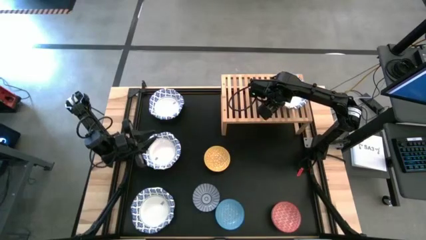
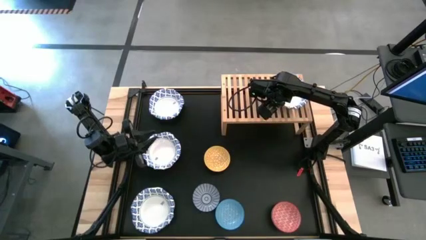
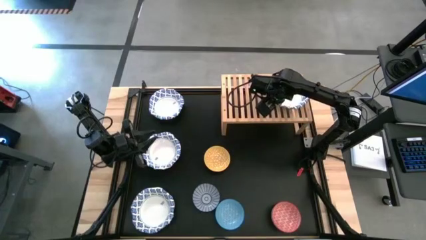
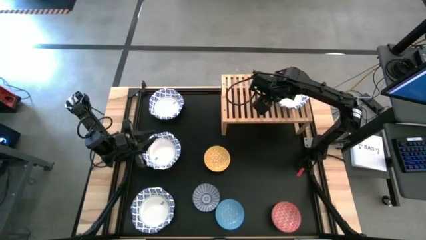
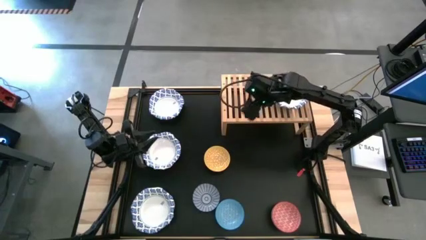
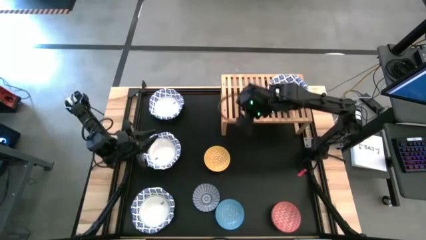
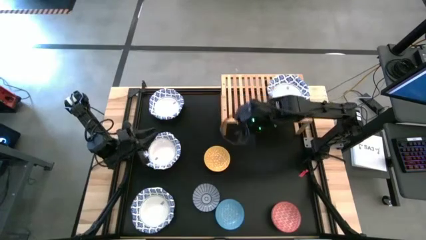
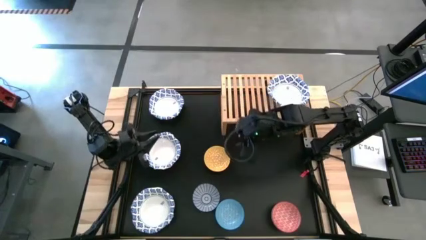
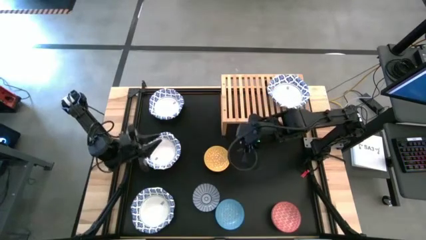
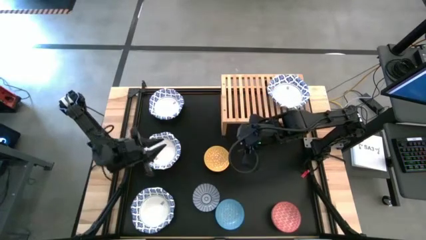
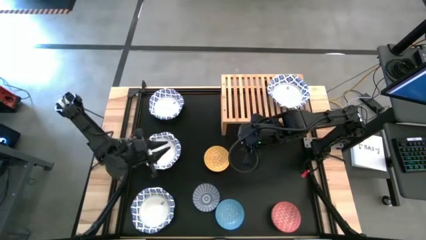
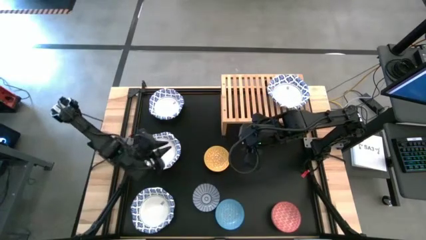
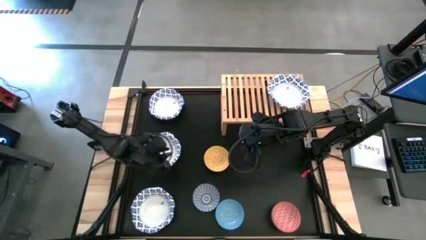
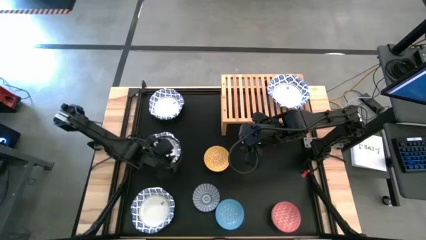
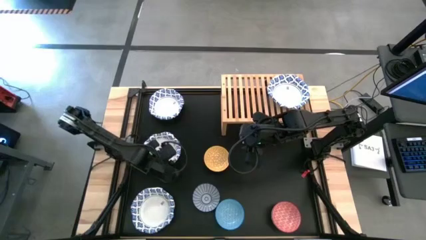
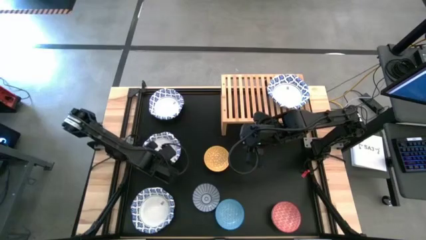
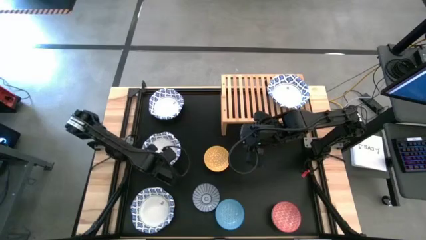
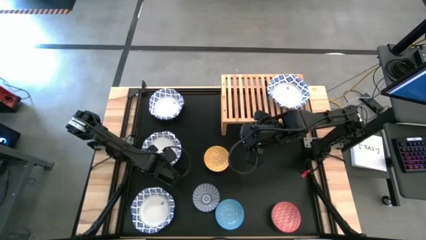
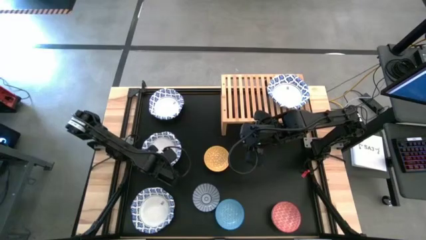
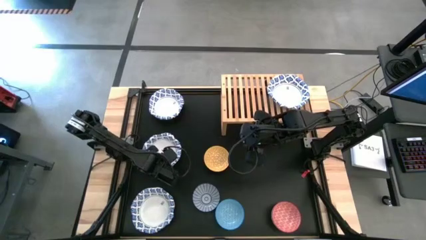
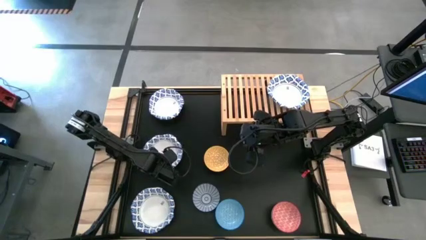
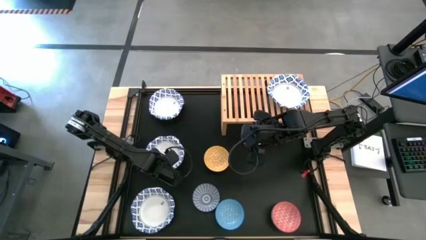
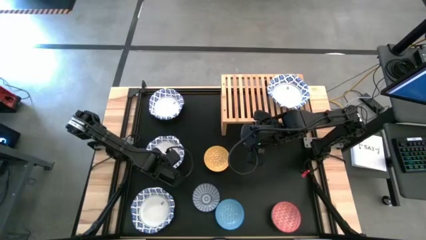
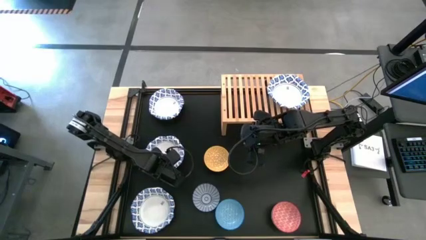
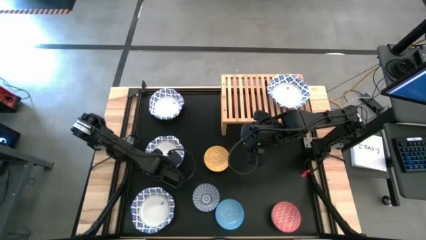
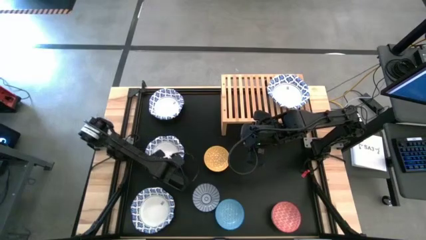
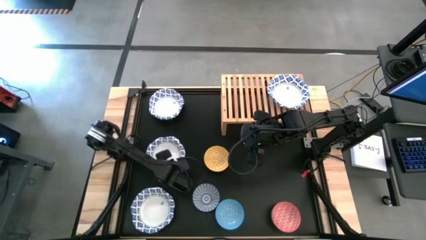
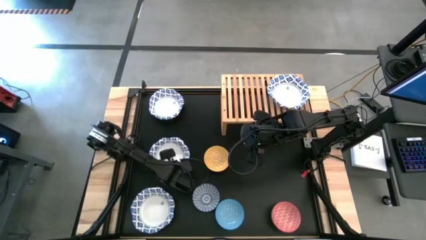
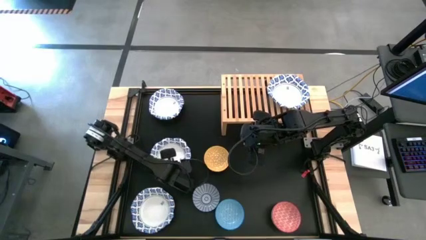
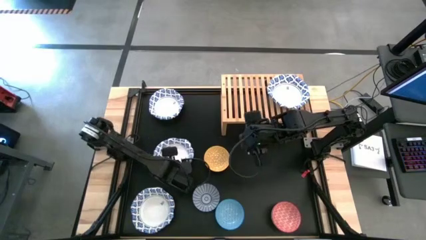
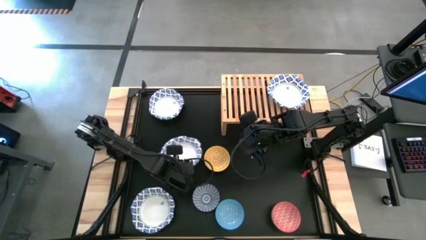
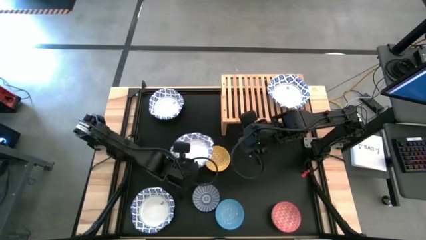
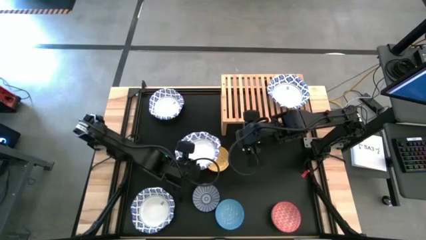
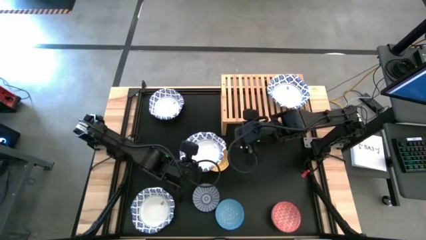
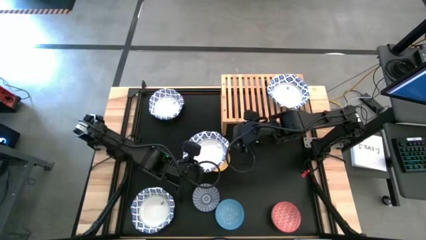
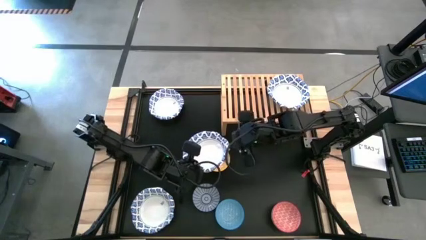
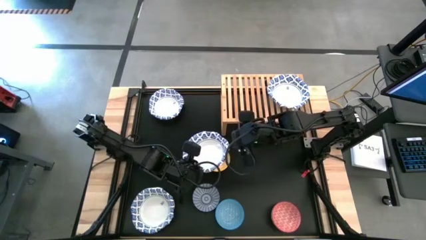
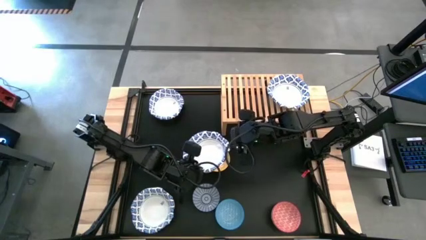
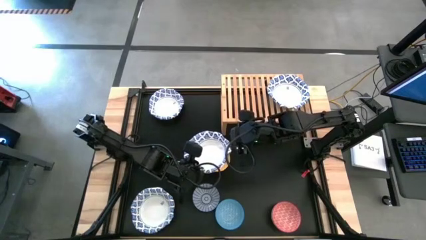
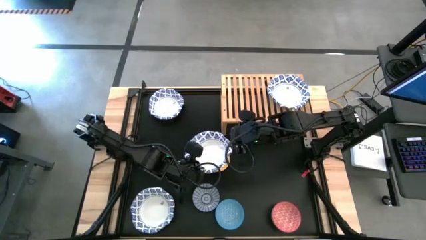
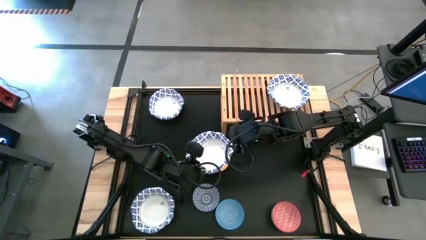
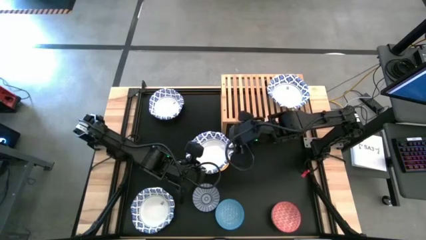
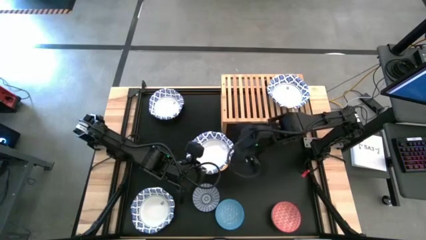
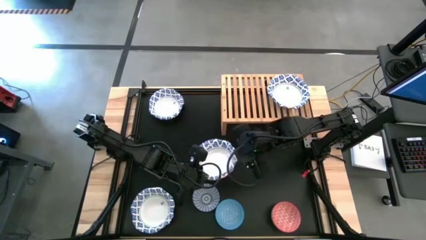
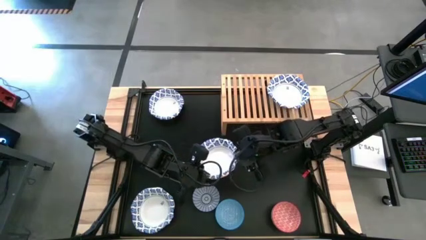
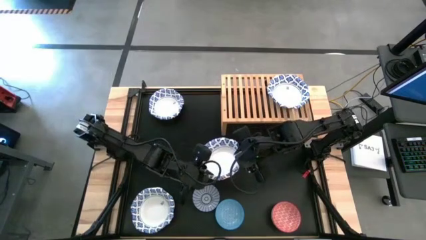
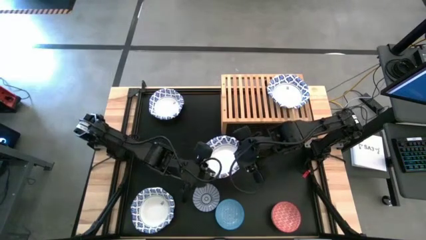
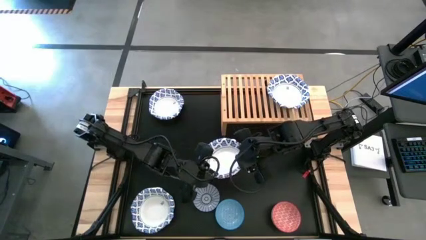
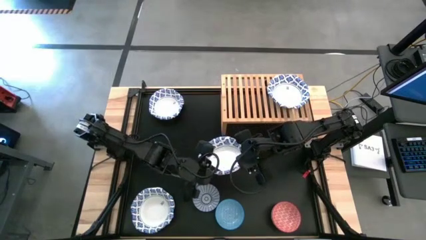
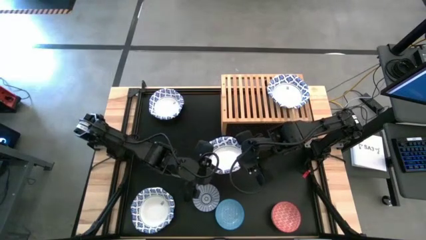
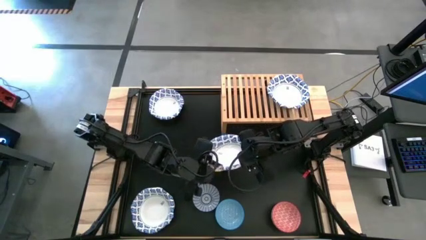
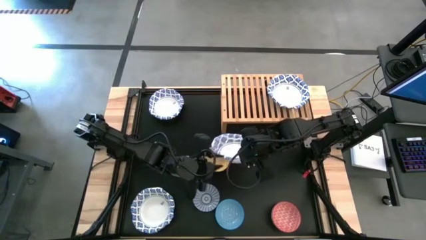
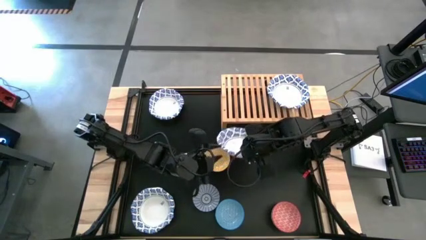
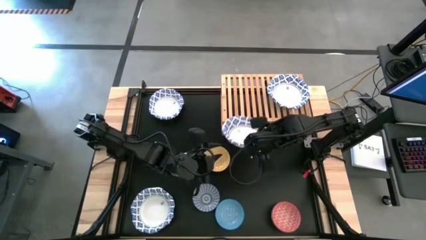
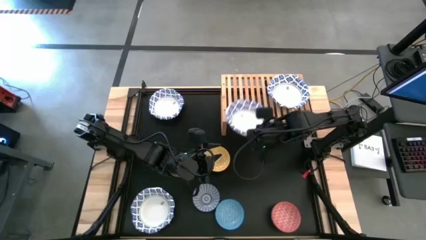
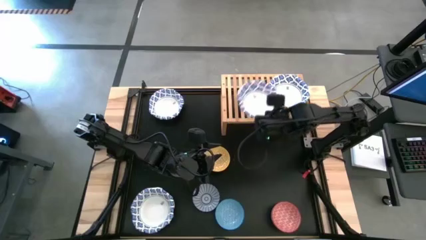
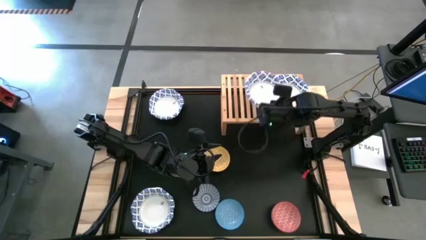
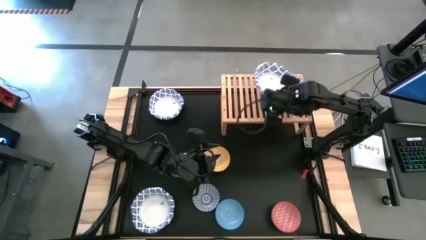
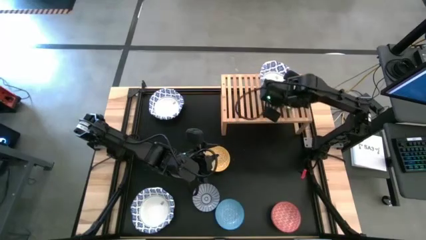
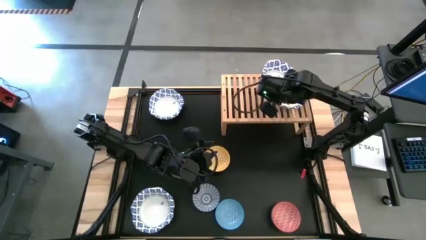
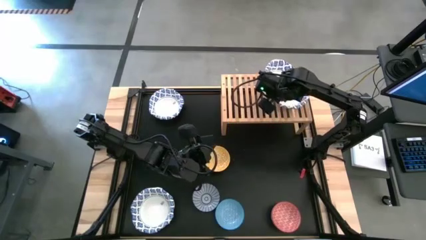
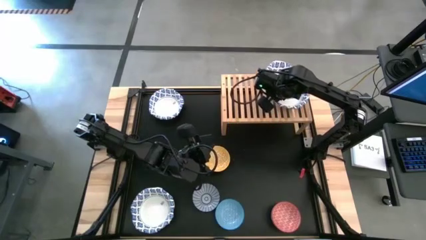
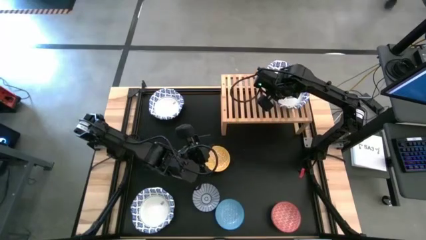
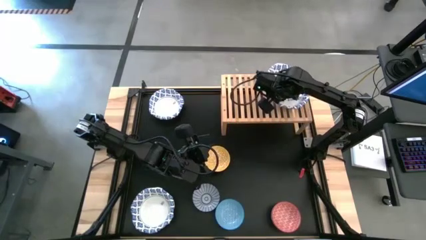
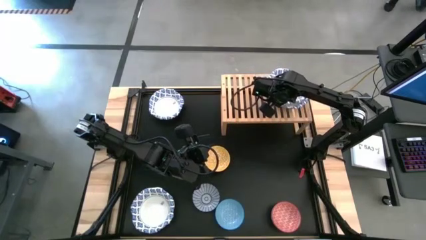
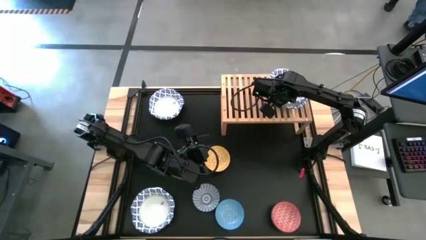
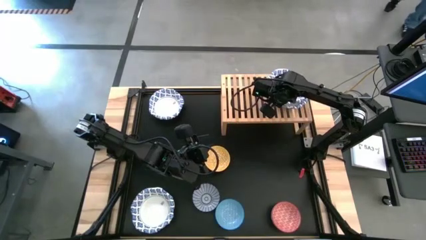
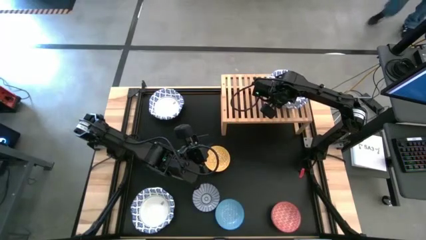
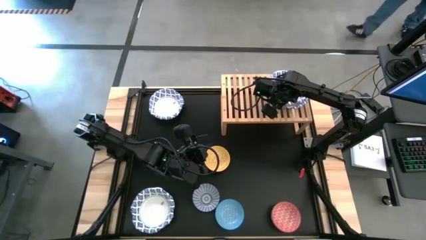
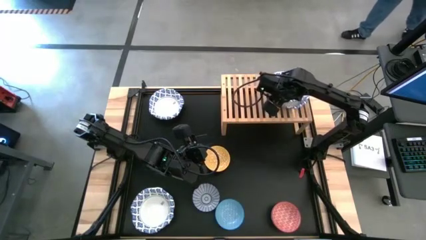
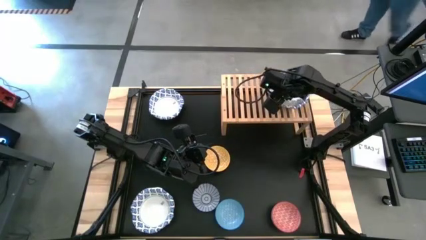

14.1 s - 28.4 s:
Task: Place and stack bowls onto a shelf
Stack the middle white bowl on top of the other white bowl on the shelf
